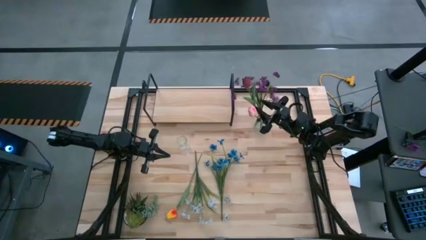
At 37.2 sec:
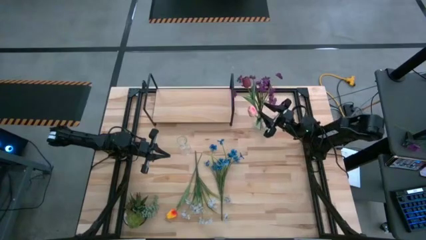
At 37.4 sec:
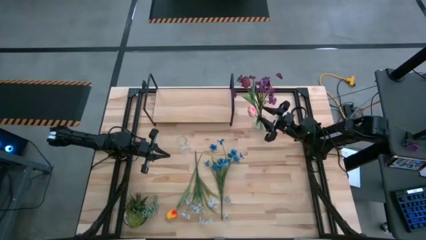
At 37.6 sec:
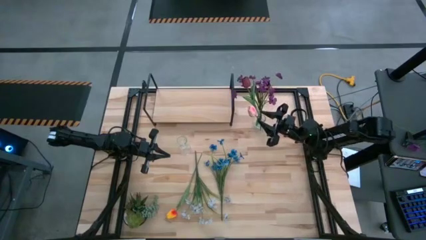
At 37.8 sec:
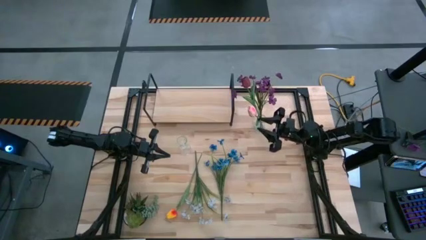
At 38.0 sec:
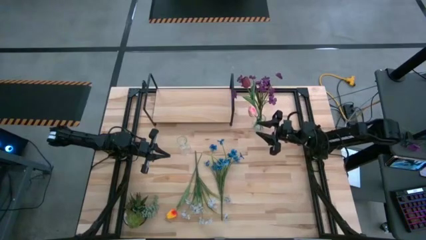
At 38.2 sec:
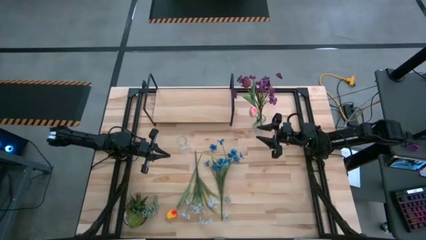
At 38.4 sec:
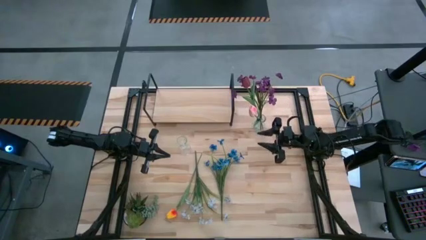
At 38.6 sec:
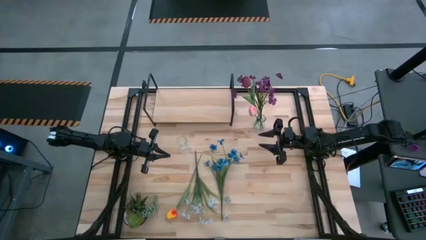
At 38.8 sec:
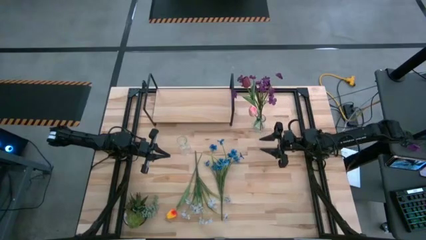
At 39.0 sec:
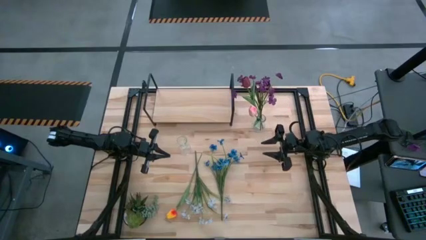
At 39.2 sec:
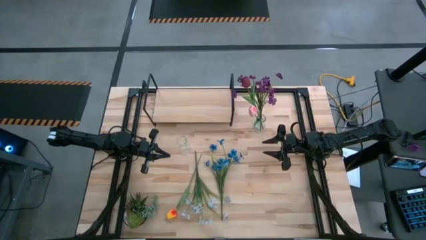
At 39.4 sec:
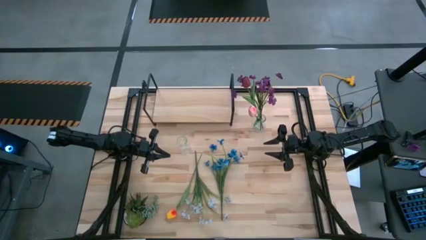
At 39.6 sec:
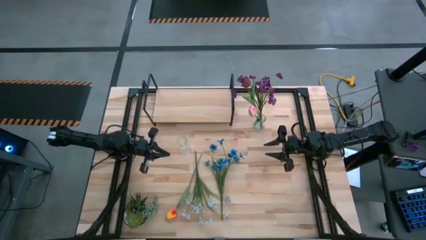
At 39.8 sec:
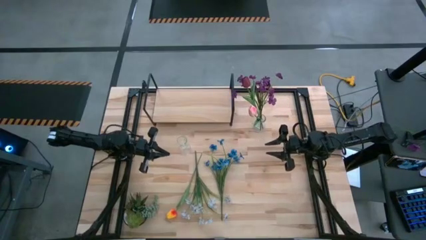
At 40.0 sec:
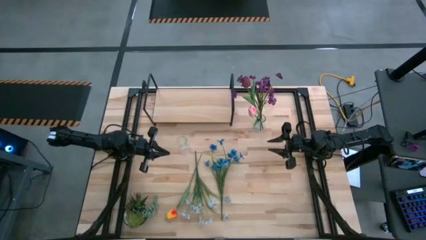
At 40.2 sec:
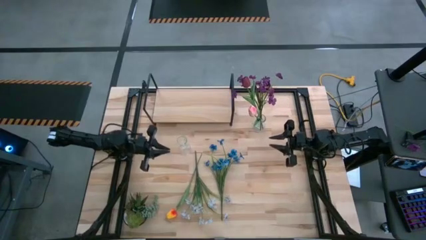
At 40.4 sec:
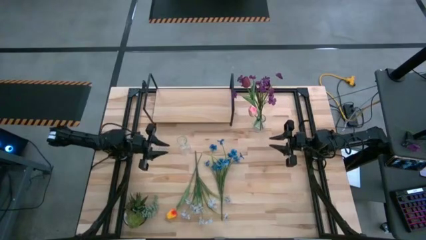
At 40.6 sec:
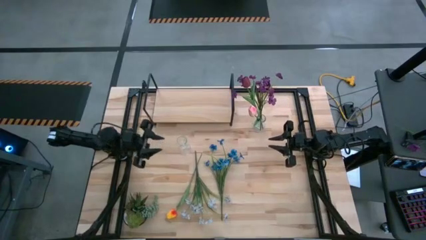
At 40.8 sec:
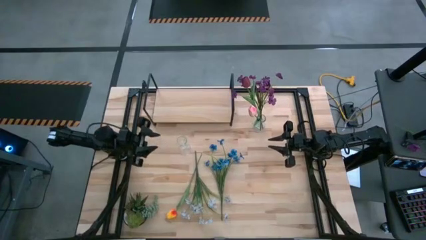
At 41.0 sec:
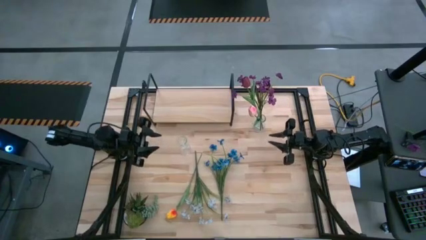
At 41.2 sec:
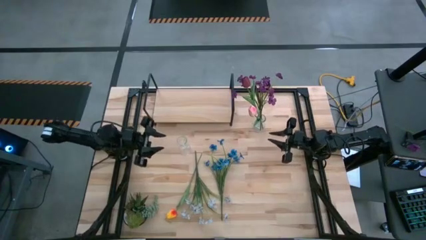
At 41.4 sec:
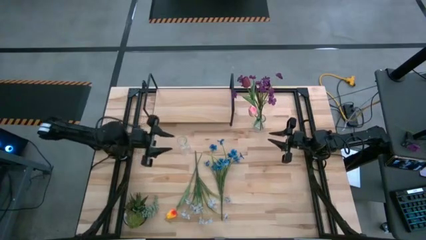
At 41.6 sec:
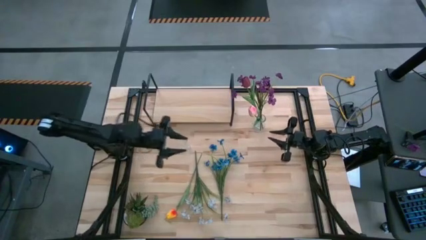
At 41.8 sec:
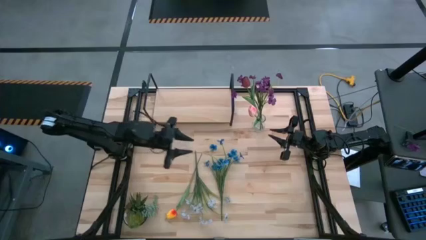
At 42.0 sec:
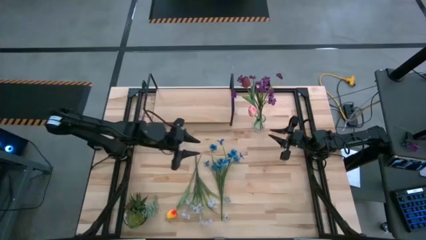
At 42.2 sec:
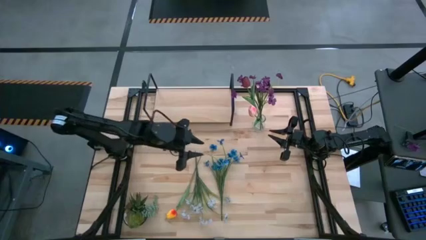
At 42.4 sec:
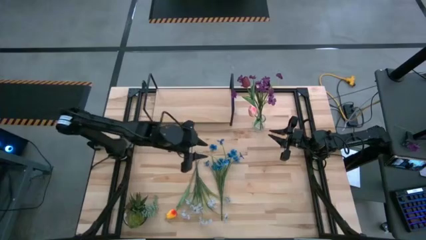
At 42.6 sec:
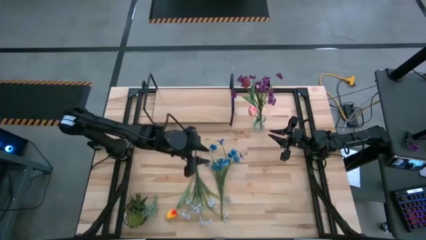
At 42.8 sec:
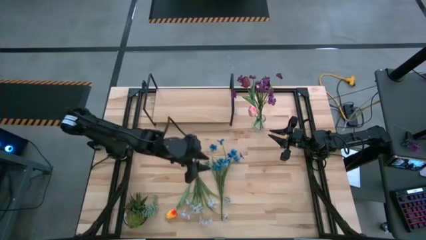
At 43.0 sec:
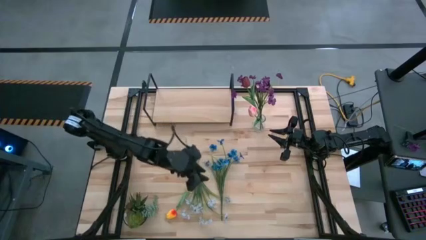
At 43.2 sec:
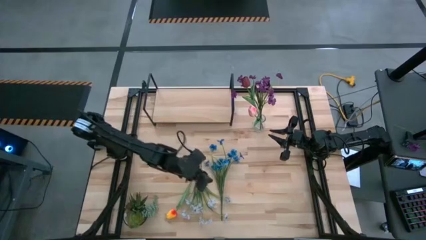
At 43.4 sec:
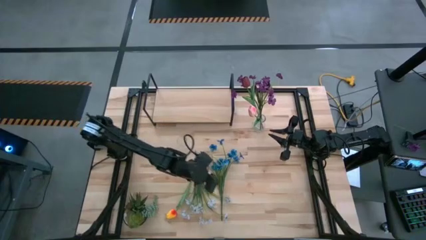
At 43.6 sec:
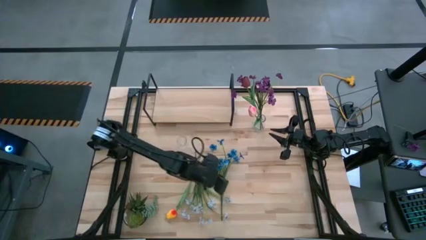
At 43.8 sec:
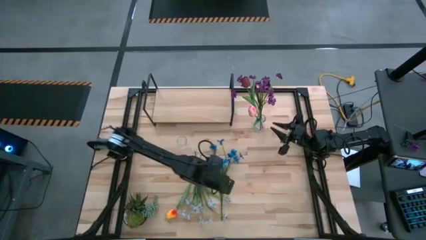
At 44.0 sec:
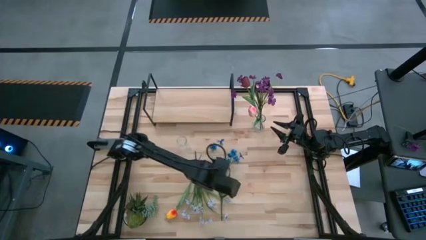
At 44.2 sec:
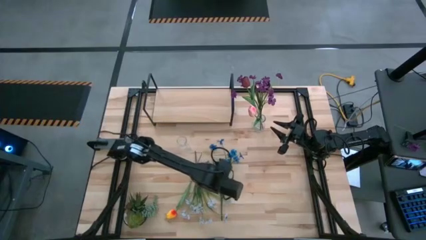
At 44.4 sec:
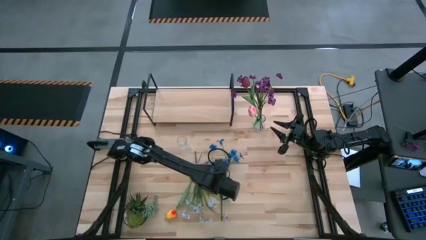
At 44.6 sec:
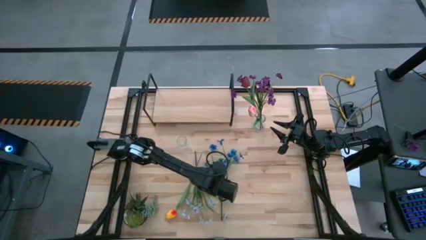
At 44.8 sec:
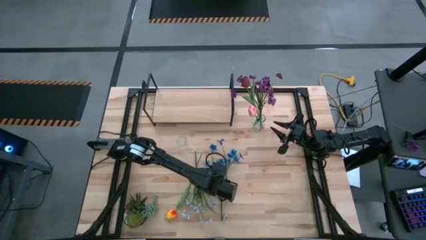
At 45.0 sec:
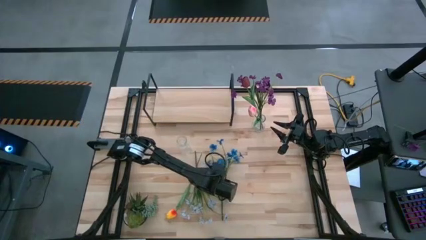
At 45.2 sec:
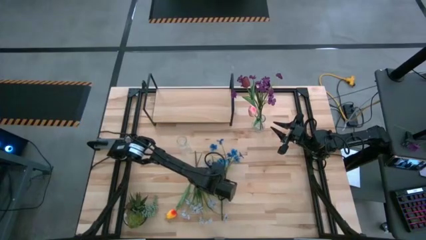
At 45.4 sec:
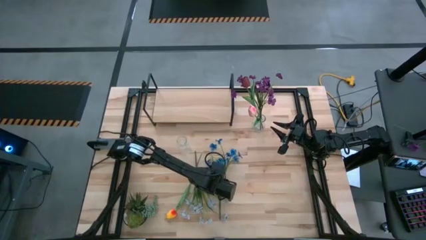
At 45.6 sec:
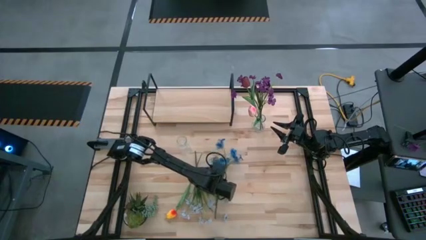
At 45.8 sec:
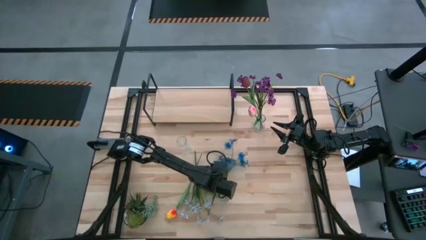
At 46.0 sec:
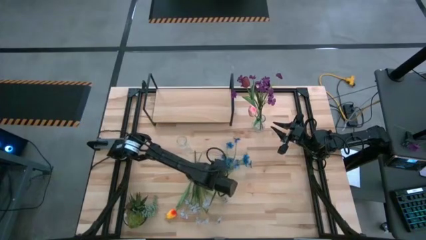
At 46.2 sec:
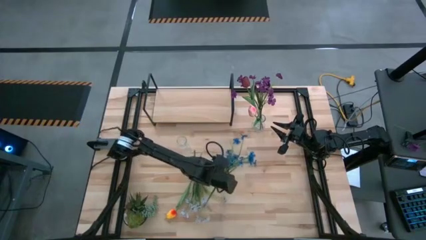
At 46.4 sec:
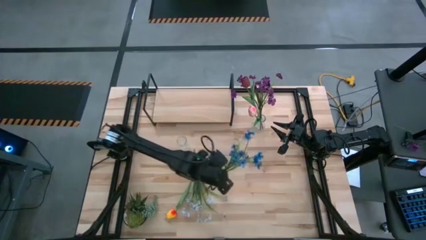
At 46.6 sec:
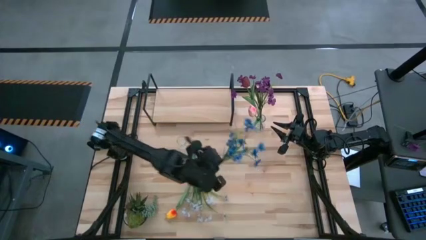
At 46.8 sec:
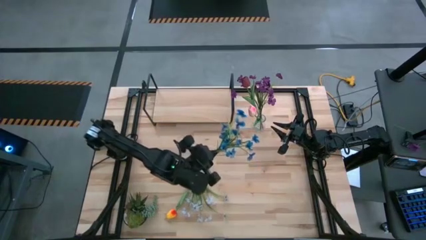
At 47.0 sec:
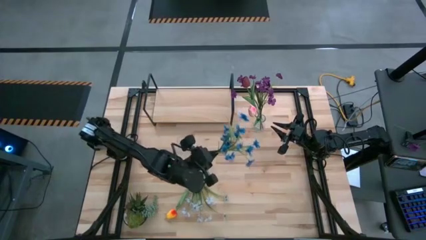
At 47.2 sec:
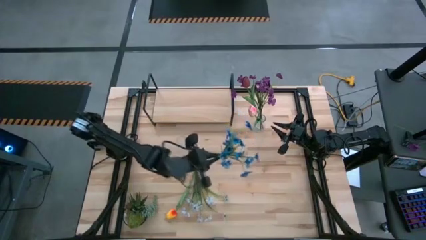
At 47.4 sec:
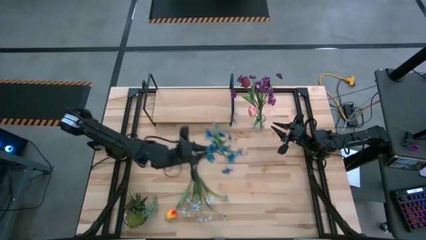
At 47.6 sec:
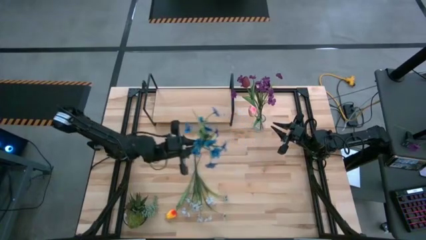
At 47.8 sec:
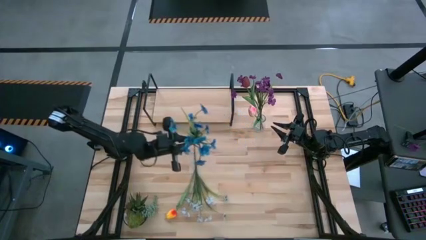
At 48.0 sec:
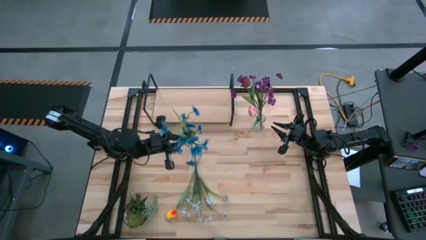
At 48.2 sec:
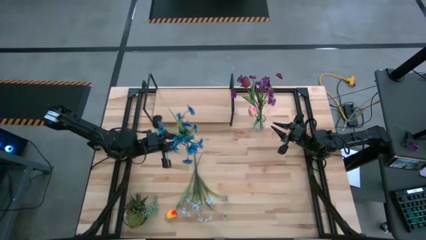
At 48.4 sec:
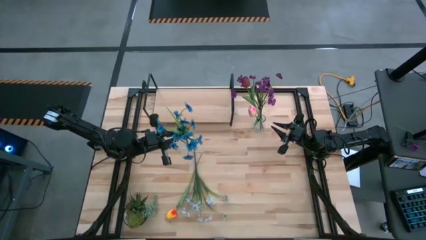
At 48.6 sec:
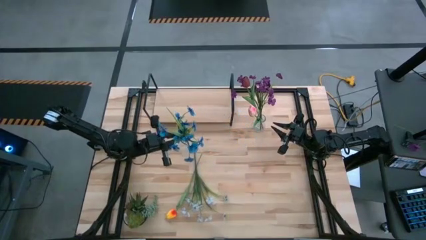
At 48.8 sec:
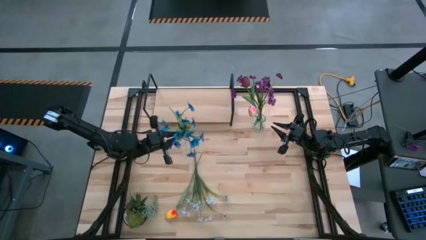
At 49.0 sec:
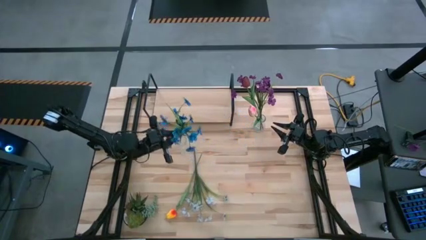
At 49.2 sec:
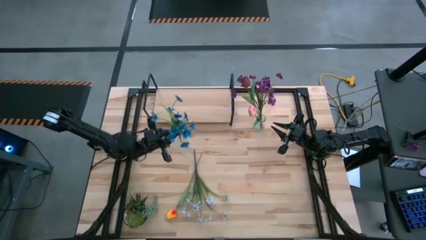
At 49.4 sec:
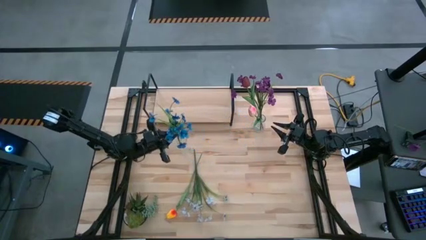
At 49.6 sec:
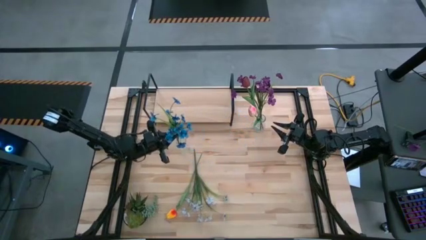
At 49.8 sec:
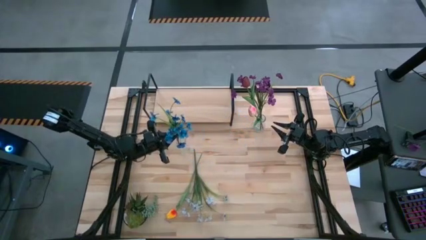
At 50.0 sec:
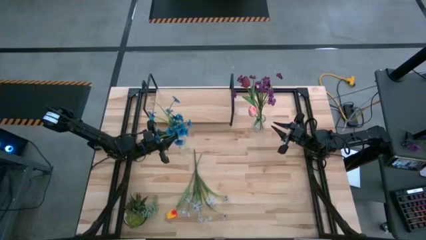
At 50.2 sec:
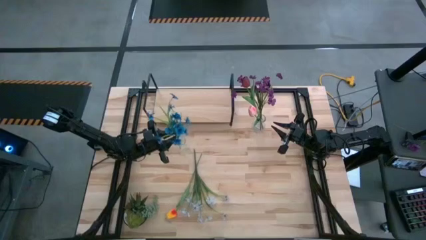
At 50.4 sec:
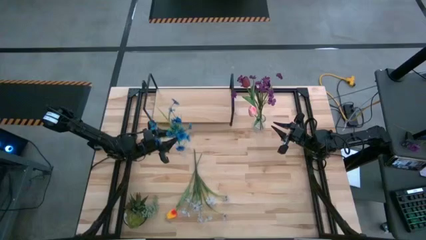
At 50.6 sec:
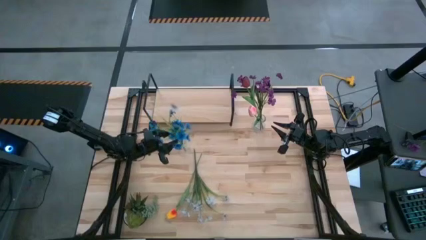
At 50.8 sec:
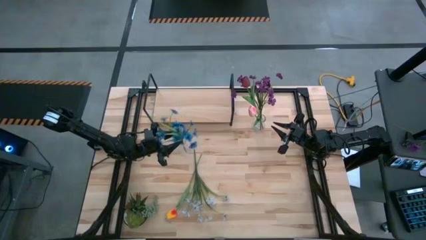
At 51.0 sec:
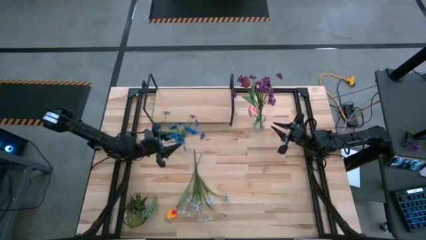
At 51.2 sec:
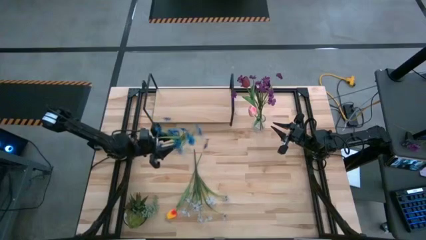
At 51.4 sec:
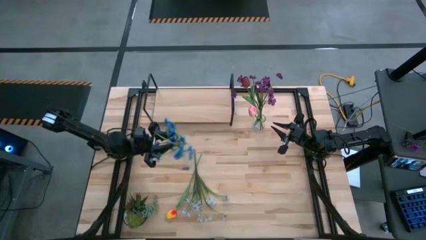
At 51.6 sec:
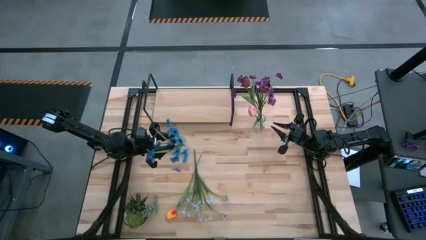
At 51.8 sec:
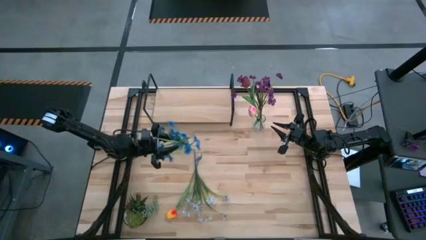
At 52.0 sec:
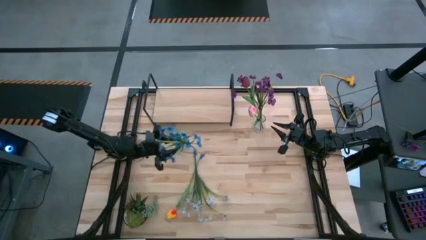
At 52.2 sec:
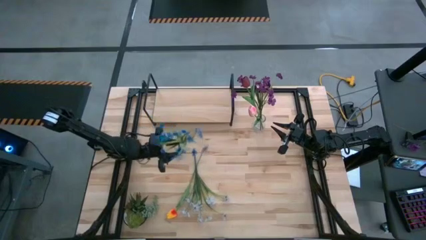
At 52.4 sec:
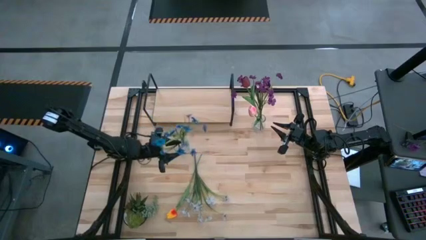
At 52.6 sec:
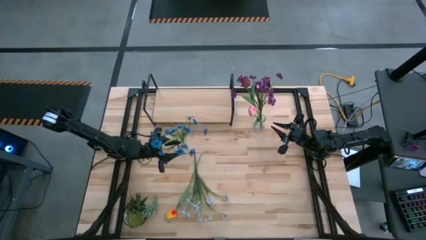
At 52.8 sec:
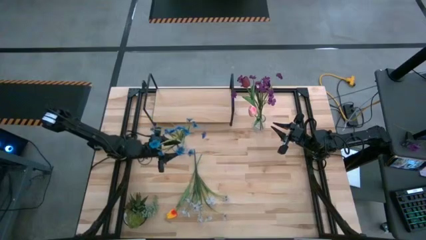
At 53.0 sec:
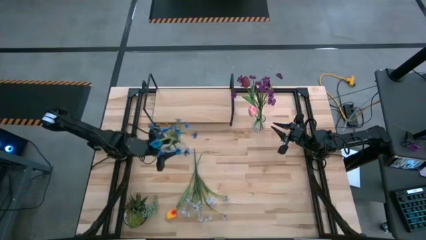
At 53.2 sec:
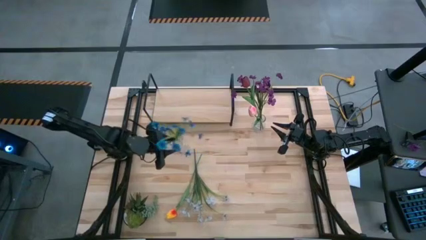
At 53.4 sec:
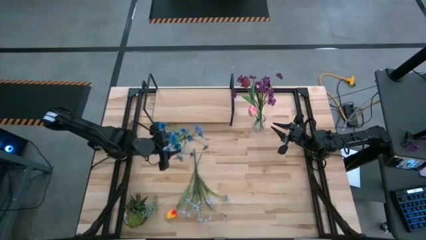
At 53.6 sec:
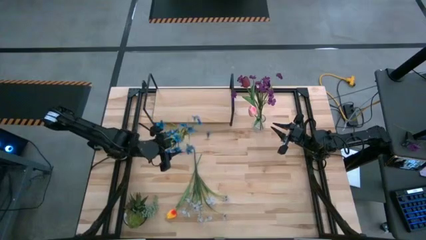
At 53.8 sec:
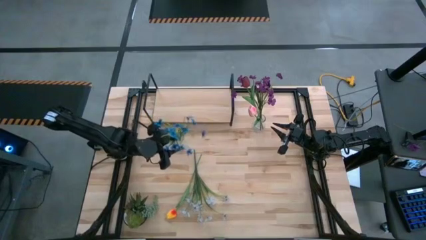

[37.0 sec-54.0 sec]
Task: Pick and place flowers into a vace then onto a shelf
Put the blue flowers into the left transparent vase
